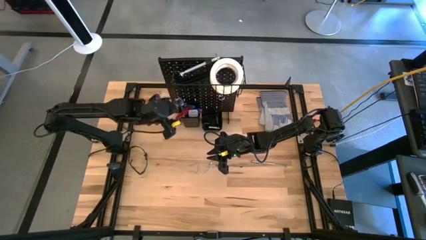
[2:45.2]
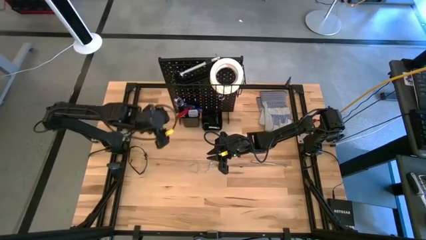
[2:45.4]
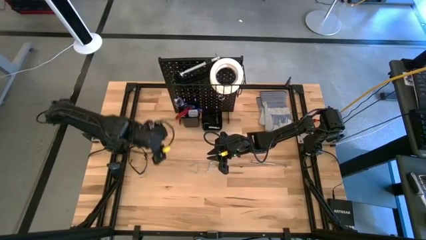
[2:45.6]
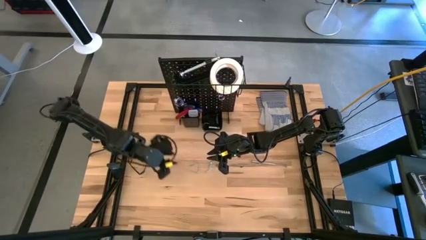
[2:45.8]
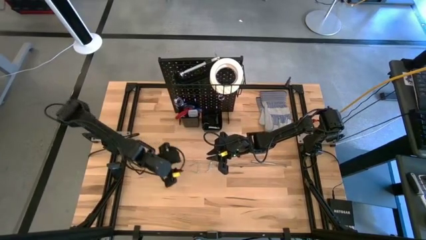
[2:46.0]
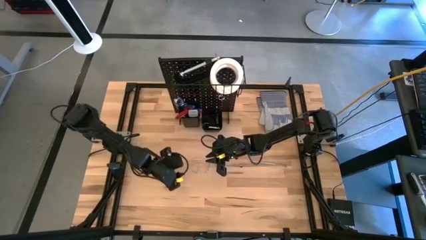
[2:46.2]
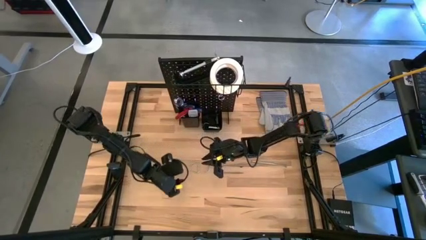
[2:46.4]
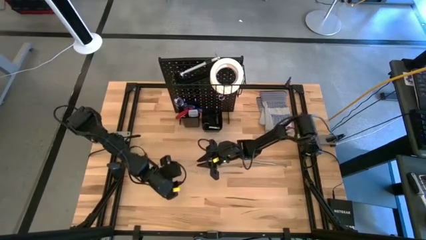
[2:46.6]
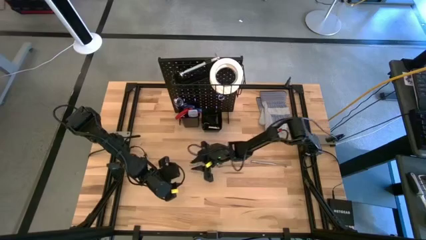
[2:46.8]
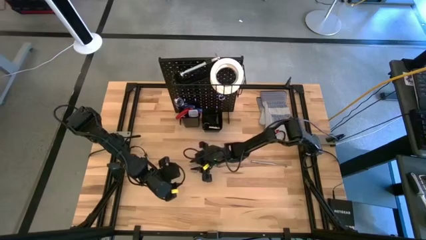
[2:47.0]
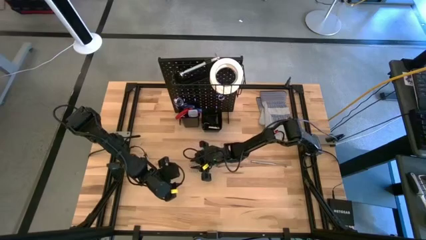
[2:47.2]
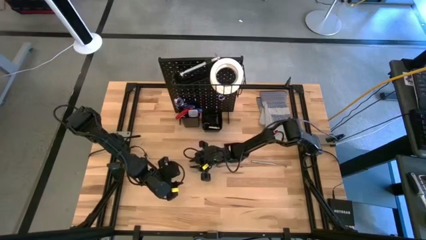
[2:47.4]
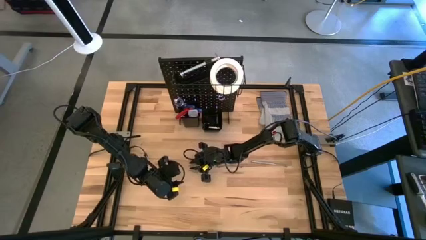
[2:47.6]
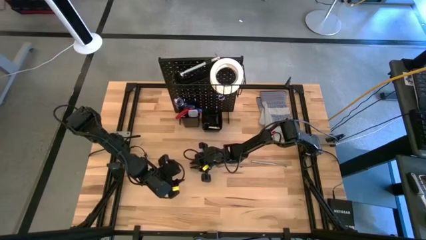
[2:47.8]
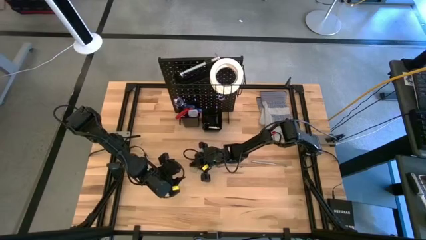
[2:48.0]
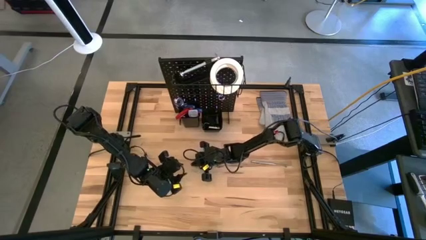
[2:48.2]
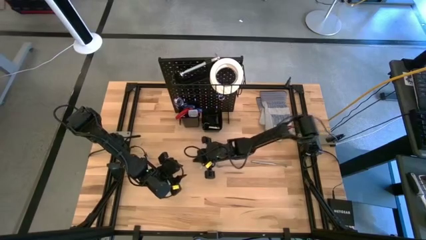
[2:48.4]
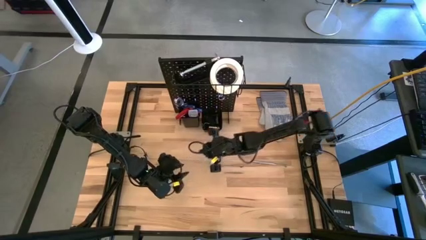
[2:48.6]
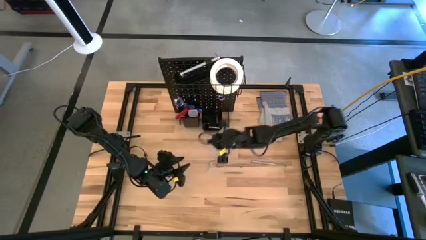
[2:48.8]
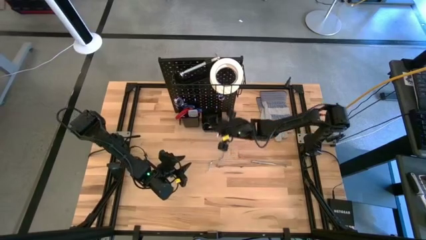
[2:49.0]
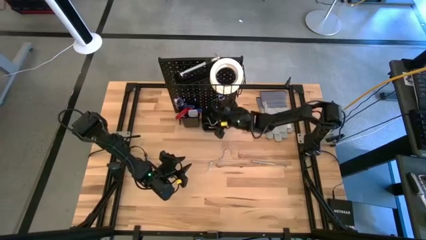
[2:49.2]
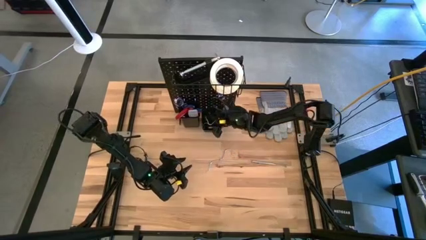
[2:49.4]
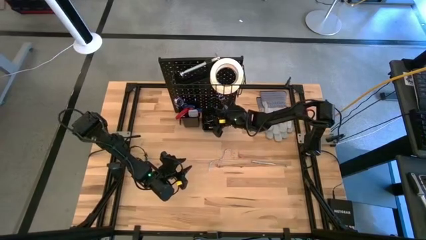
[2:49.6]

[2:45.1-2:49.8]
Task: Hang tools onto peg board
Put the pegboard hook into the right bin on the pegboard

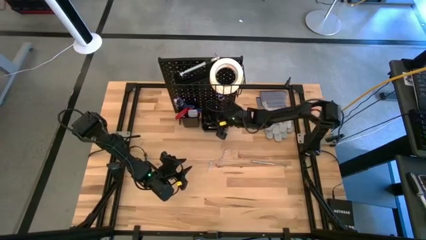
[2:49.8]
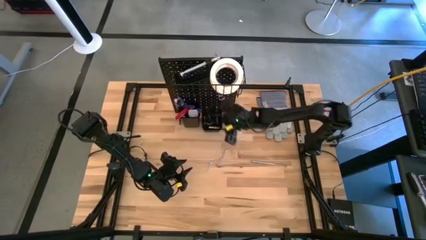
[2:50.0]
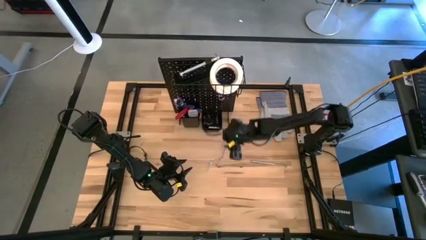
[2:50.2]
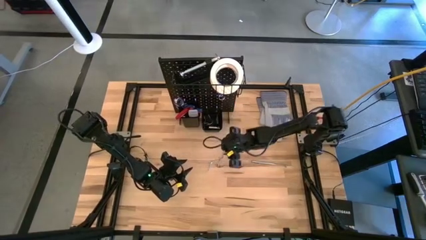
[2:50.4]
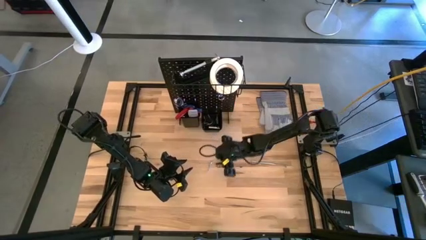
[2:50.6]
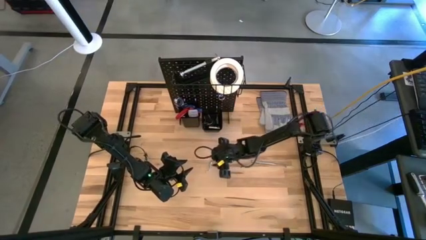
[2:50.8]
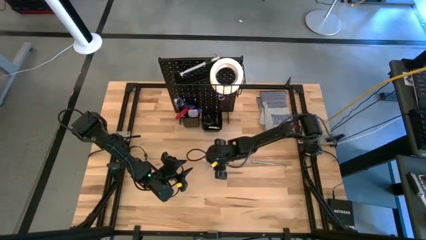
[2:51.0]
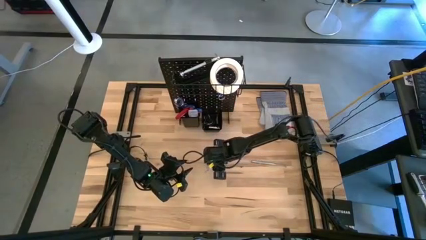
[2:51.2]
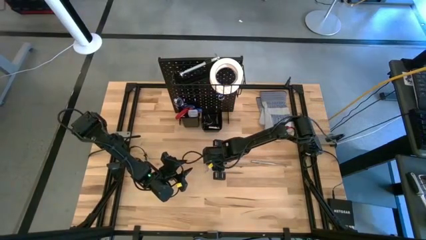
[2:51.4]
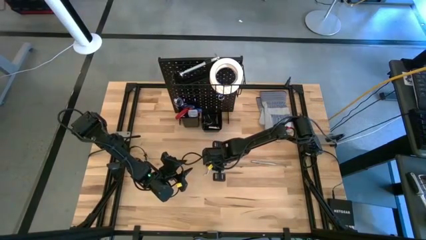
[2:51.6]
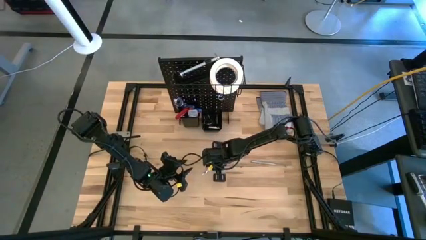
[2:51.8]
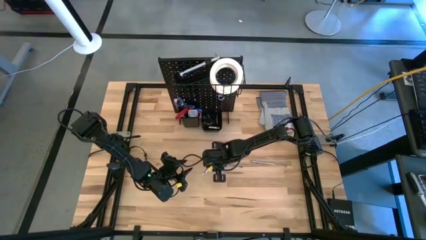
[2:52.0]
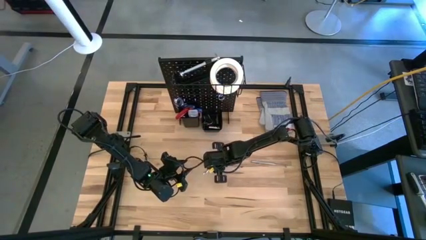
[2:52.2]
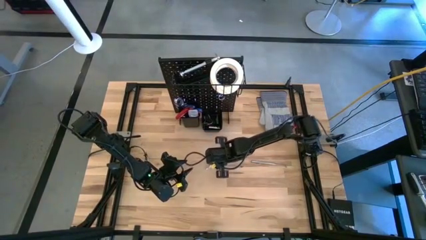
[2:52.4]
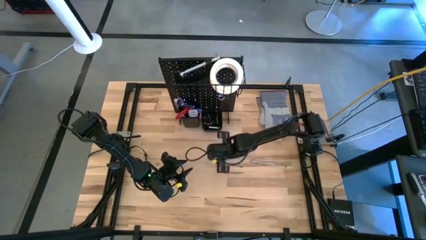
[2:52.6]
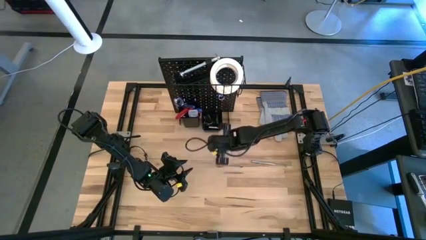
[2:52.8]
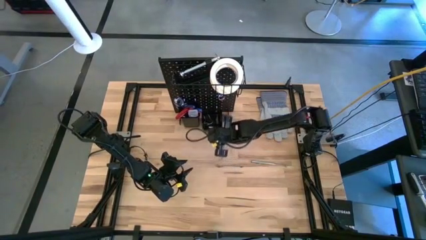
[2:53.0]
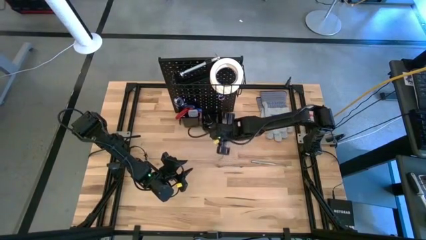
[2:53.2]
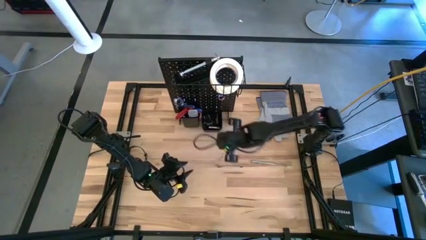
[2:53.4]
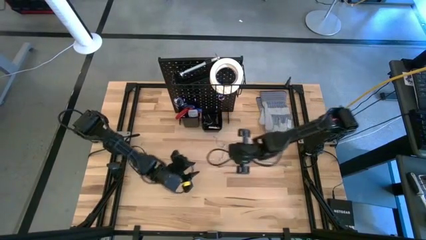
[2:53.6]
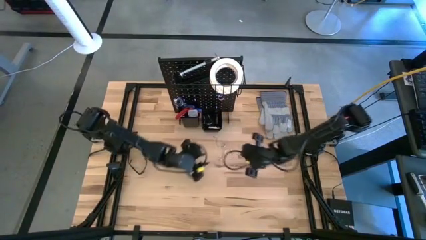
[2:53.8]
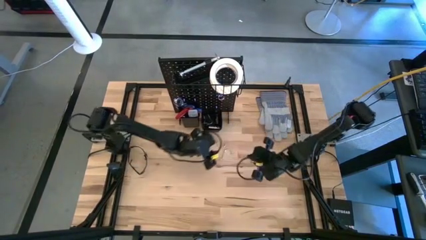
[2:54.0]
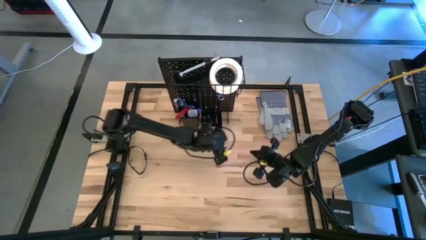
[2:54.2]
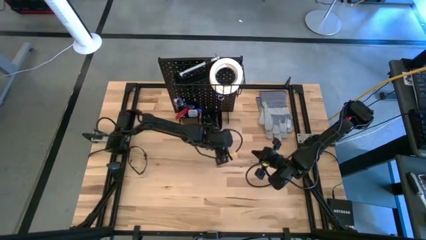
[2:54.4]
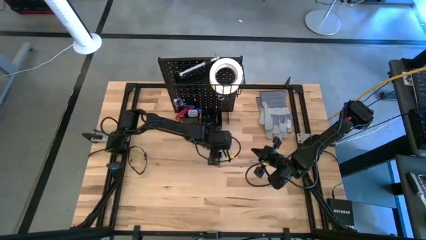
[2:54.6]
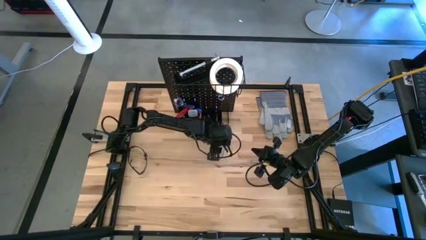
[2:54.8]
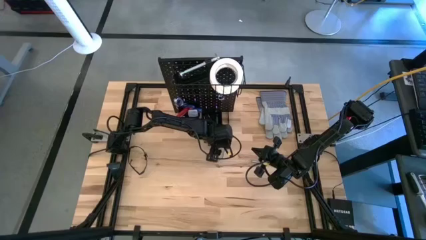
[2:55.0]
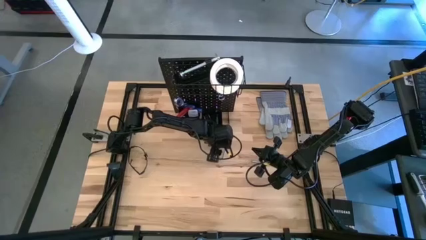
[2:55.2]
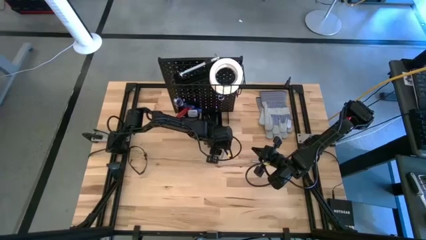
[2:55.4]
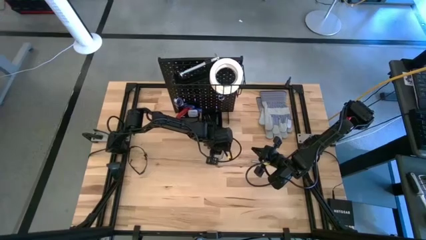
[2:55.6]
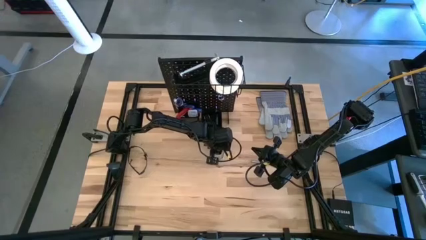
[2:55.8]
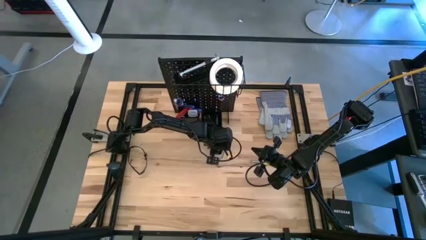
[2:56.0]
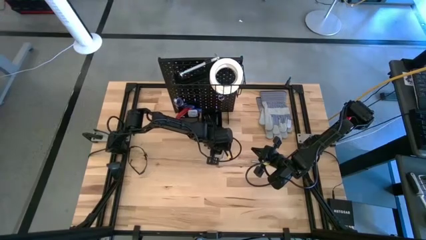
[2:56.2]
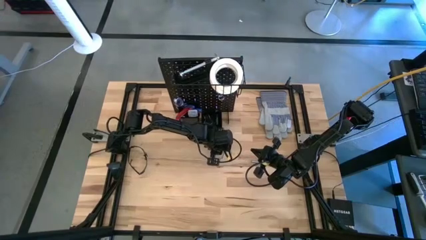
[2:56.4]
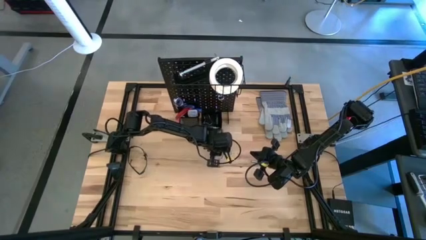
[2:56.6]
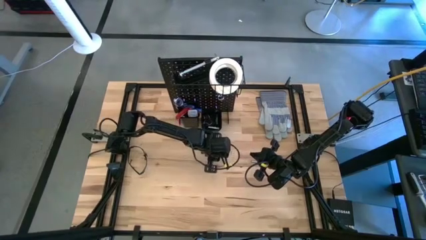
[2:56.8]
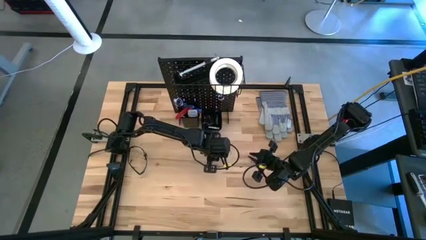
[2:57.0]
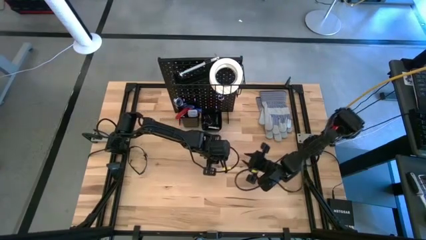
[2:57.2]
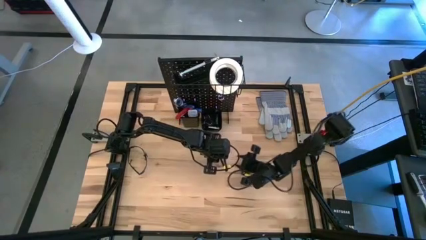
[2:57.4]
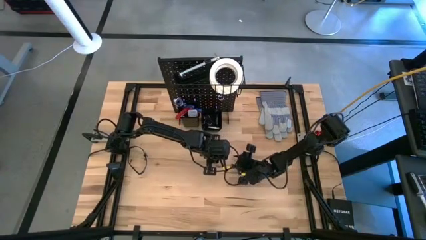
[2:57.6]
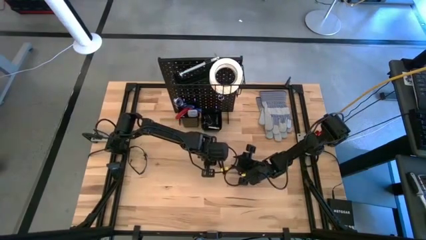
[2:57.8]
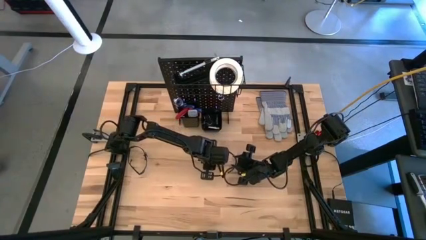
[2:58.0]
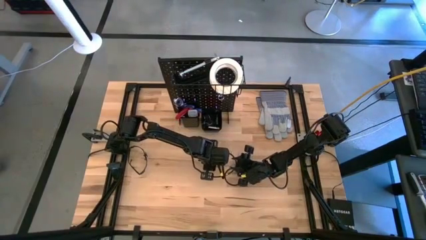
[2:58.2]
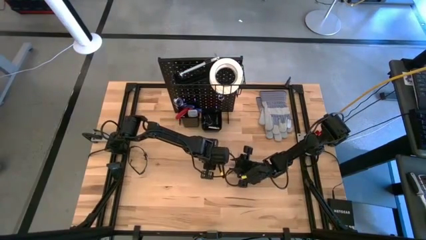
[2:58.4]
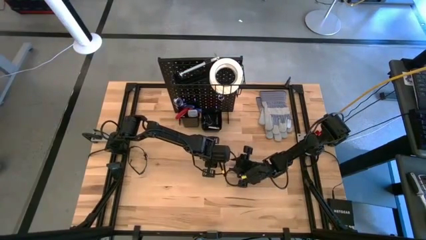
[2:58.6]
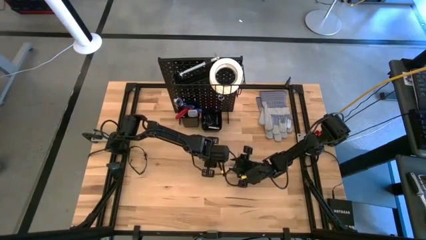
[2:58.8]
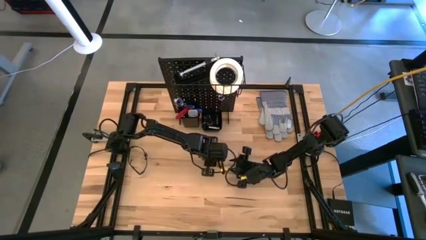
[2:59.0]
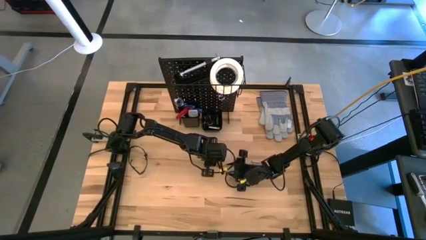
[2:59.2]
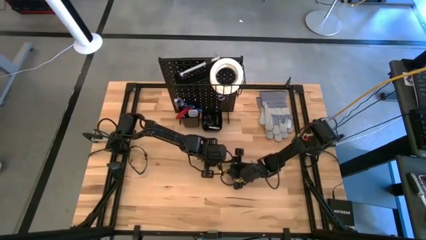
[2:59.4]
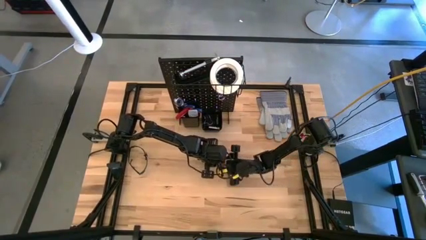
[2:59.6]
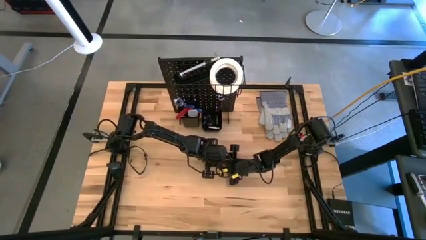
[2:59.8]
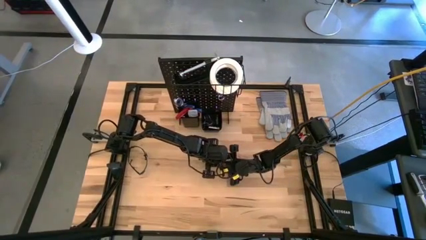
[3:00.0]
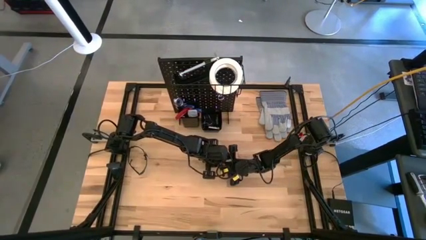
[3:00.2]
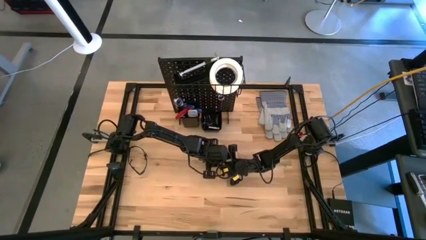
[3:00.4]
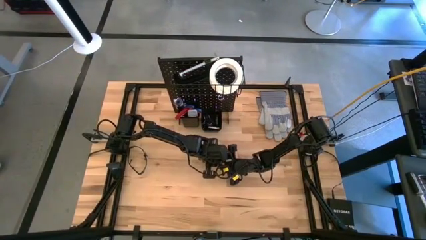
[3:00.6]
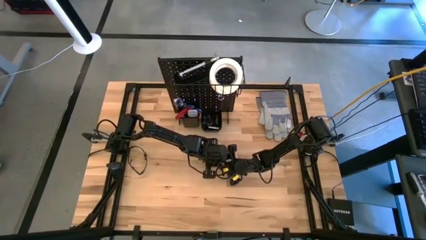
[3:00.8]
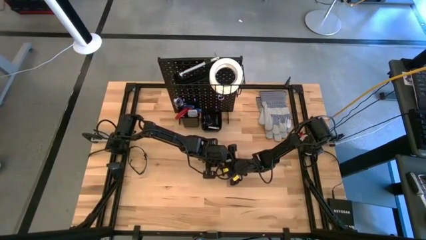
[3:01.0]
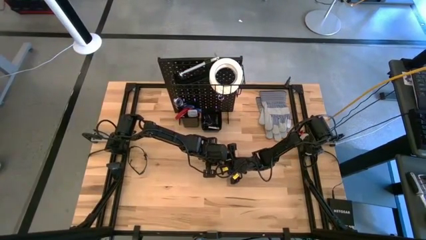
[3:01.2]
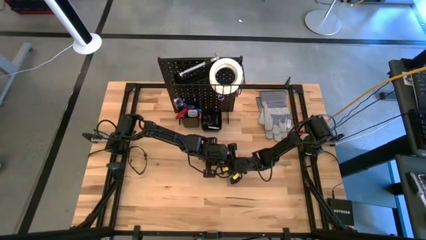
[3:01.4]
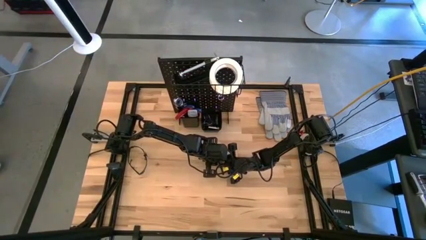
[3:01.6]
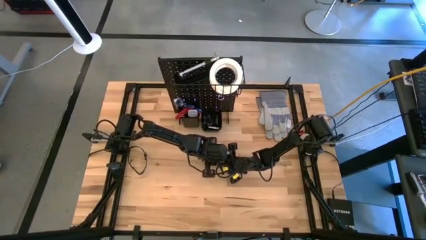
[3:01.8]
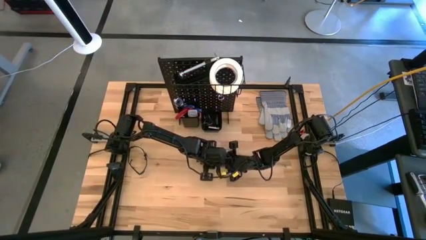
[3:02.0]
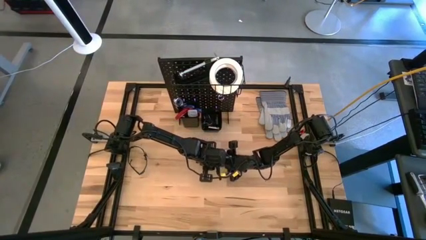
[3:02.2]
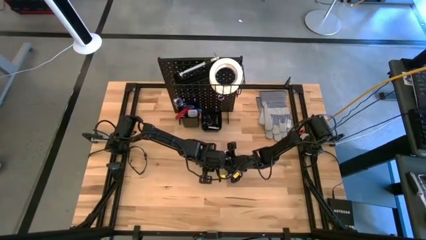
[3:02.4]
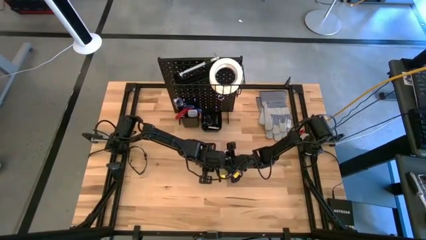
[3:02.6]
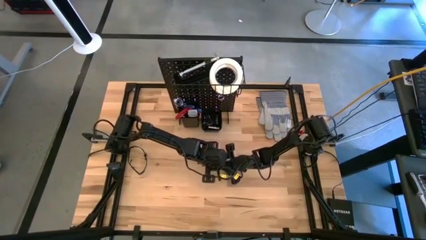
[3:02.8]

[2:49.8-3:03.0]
Put the pegboard hook into the right bin on the pegboard
